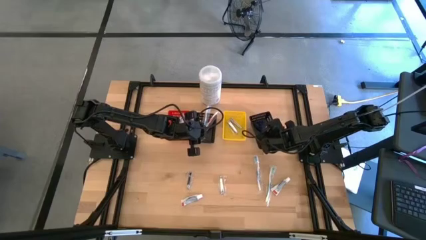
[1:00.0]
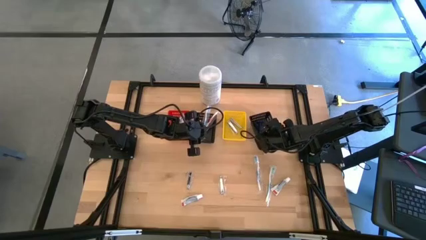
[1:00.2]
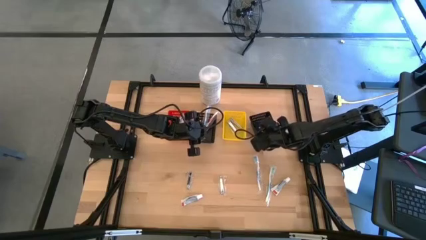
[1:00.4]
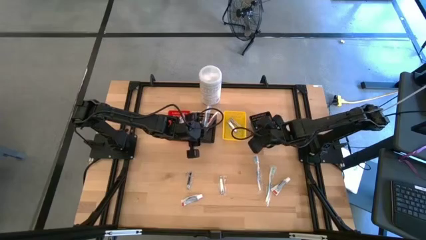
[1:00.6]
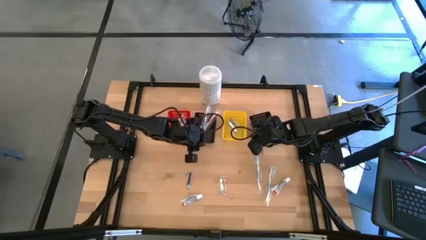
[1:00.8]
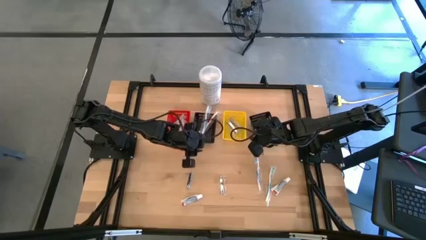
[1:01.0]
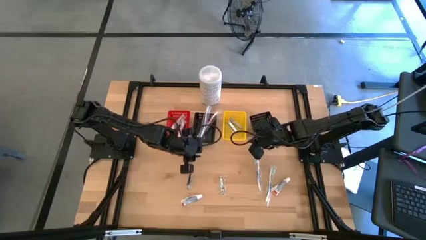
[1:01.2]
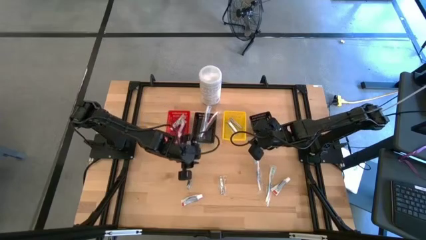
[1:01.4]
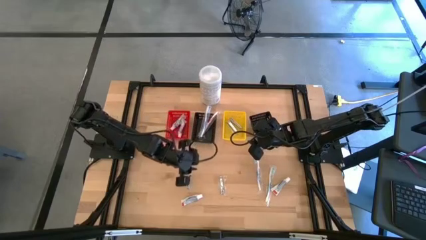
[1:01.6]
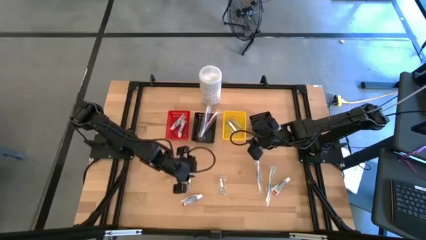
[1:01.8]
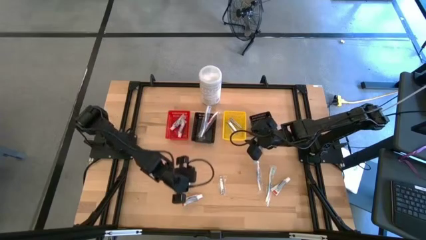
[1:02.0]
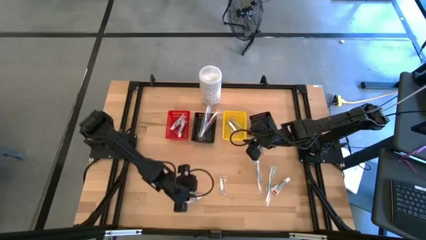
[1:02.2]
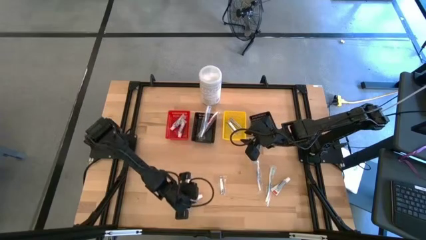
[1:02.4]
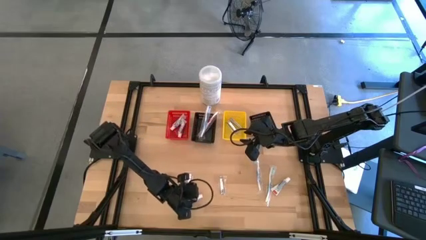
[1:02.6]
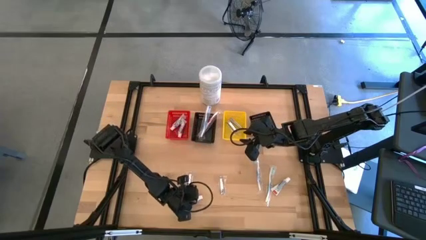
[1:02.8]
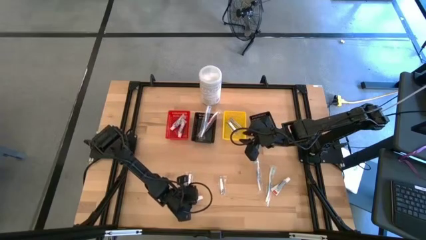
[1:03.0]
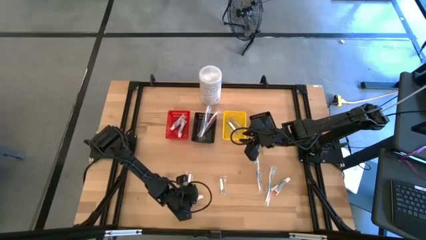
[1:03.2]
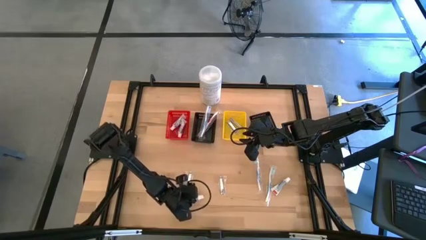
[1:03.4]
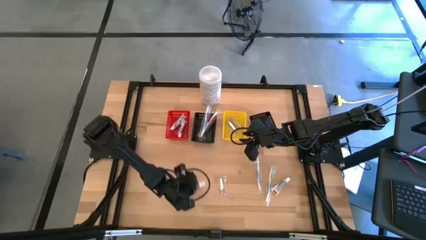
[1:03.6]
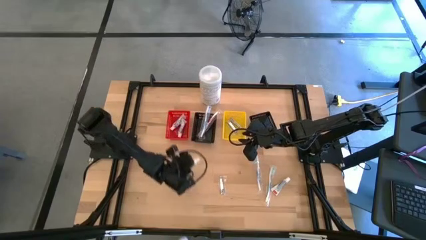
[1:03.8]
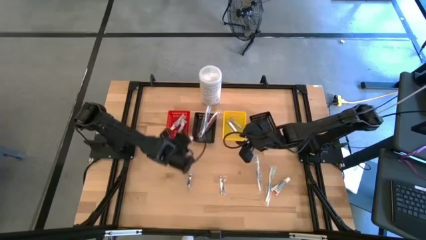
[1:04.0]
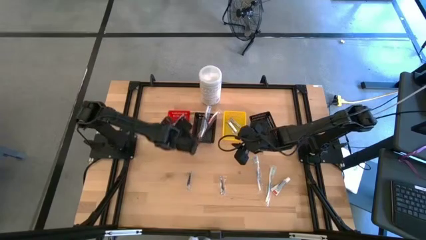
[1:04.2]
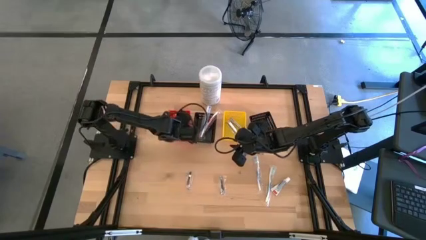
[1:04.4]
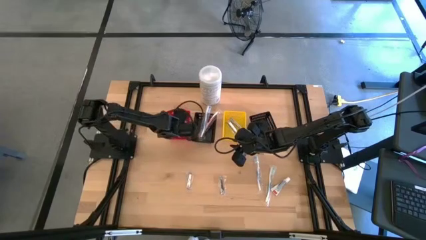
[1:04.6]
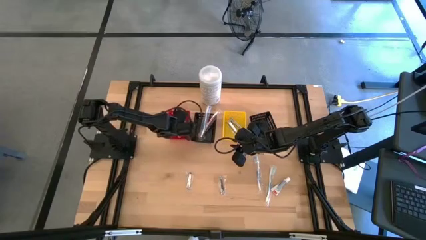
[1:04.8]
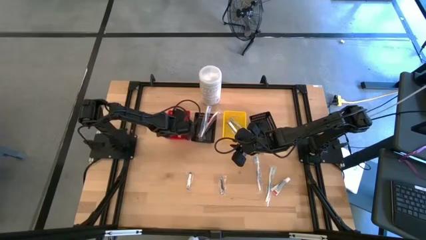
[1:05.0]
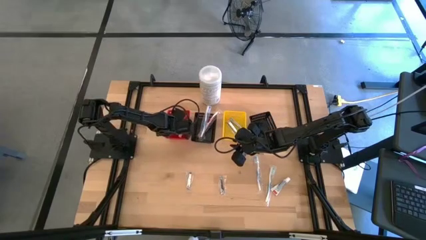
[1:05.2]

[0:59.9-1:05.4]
Task: Pick & Place Travel size toiletries
Put the toothpaste into the red basket

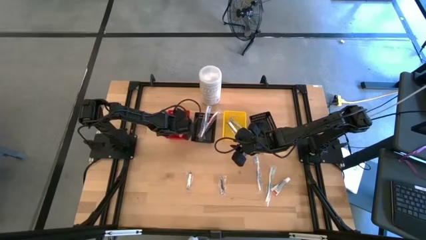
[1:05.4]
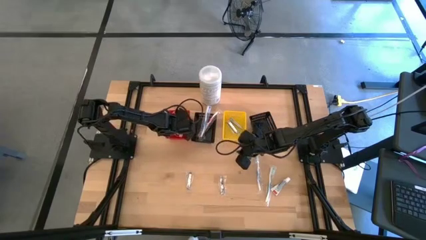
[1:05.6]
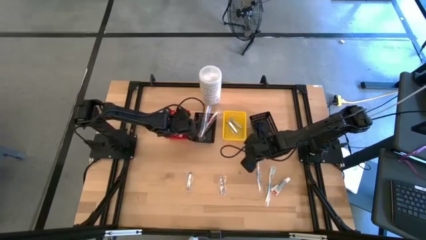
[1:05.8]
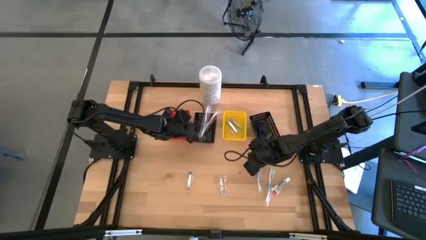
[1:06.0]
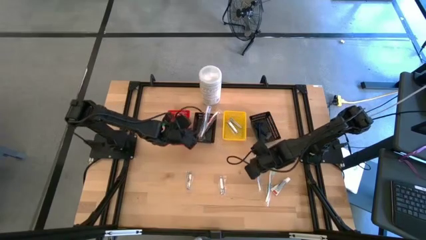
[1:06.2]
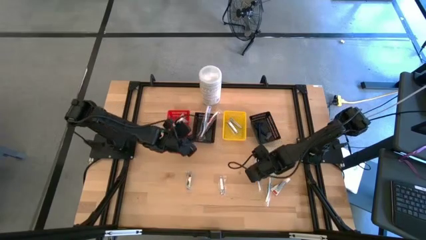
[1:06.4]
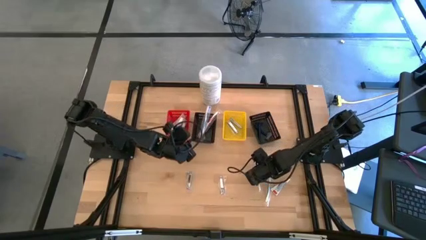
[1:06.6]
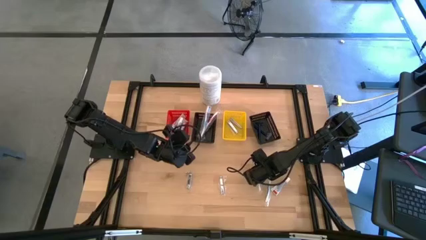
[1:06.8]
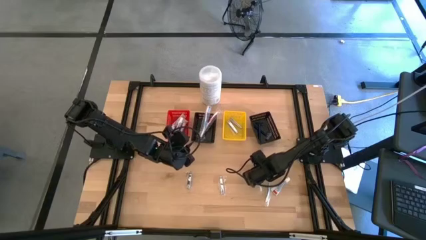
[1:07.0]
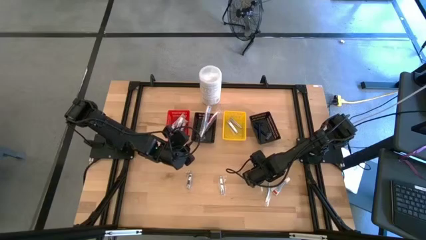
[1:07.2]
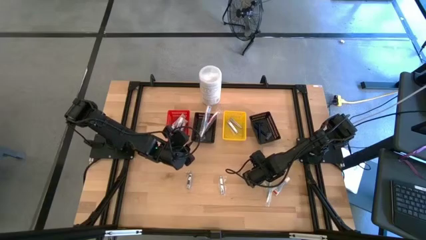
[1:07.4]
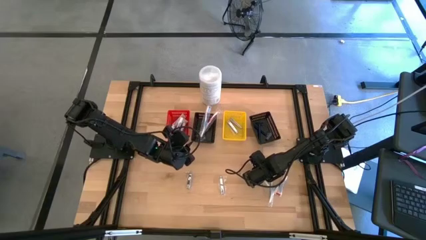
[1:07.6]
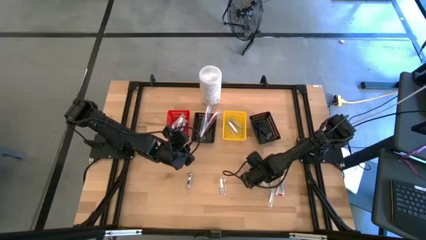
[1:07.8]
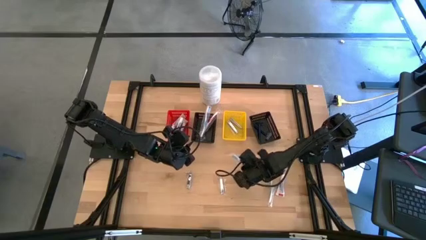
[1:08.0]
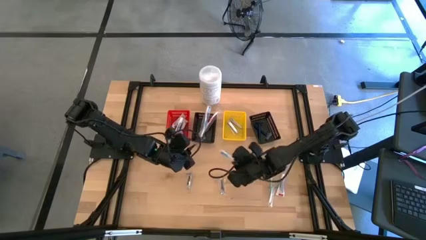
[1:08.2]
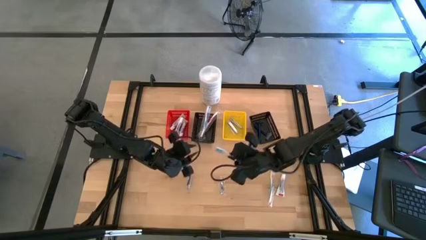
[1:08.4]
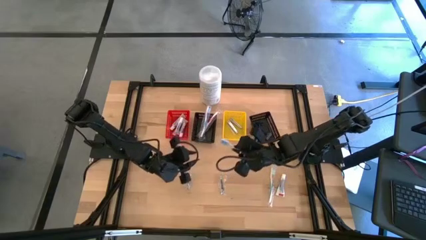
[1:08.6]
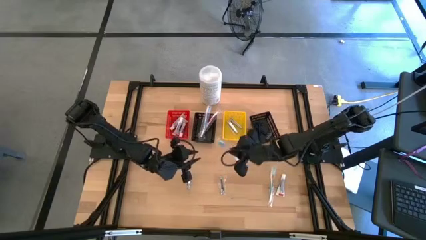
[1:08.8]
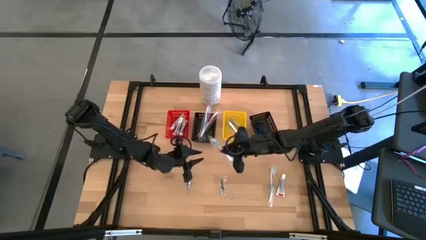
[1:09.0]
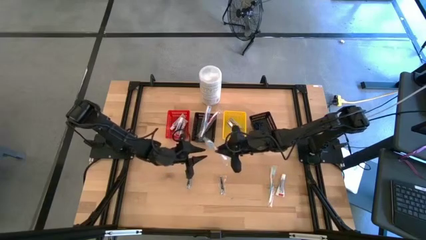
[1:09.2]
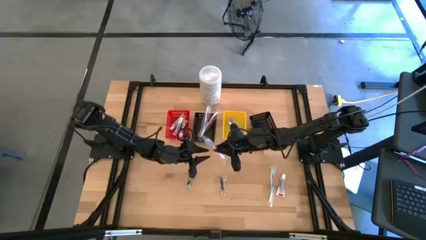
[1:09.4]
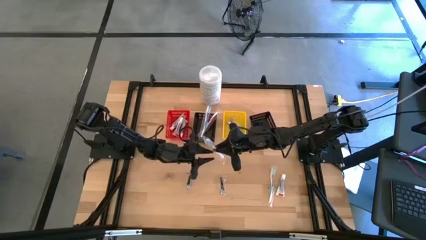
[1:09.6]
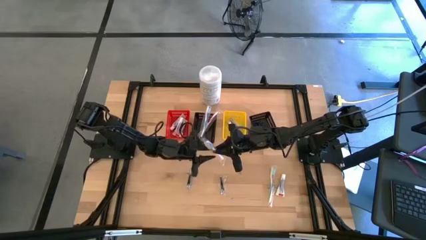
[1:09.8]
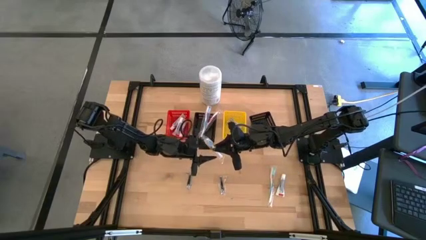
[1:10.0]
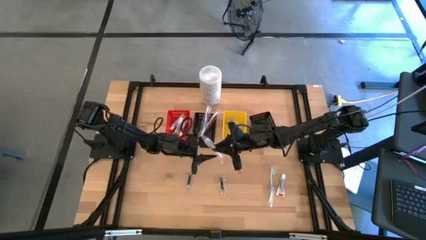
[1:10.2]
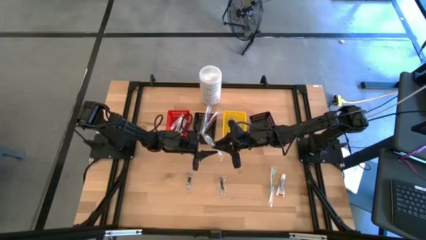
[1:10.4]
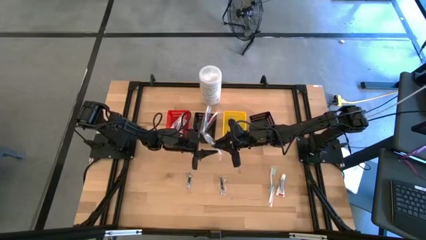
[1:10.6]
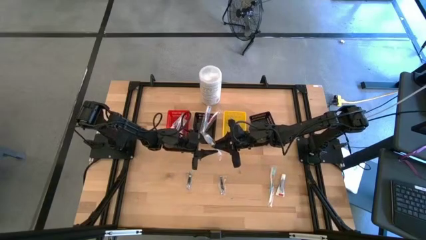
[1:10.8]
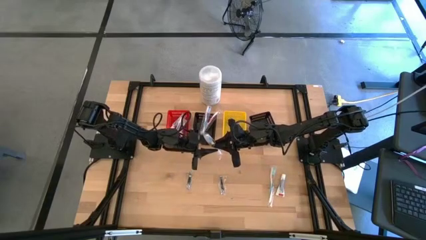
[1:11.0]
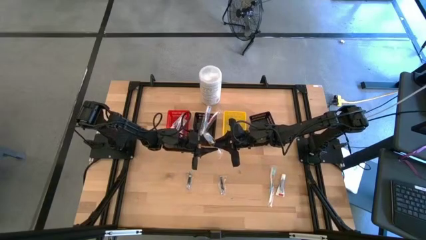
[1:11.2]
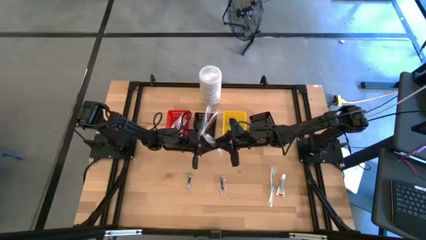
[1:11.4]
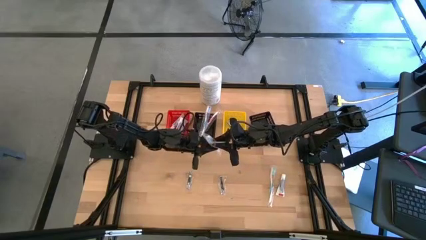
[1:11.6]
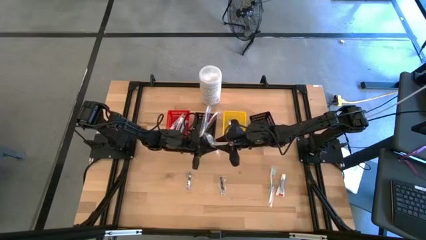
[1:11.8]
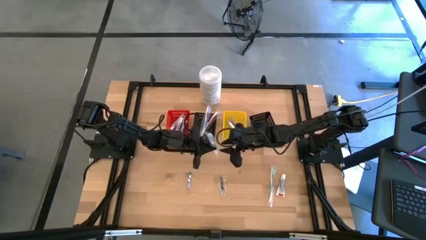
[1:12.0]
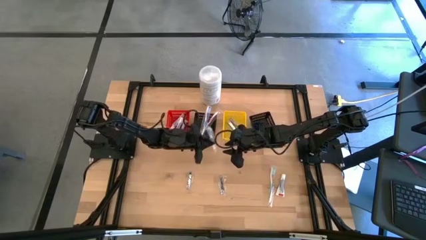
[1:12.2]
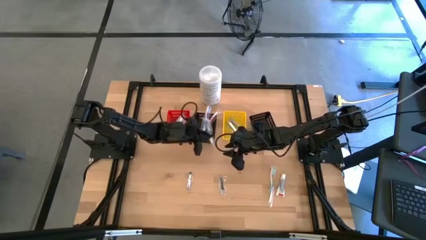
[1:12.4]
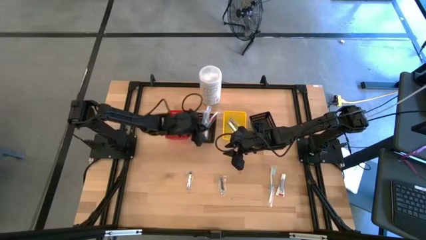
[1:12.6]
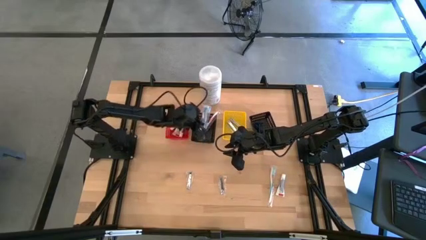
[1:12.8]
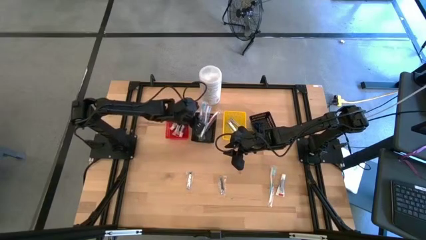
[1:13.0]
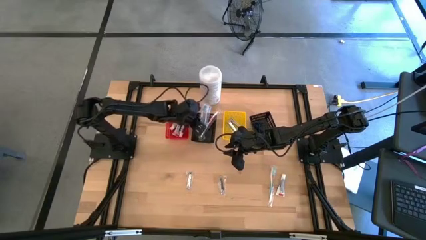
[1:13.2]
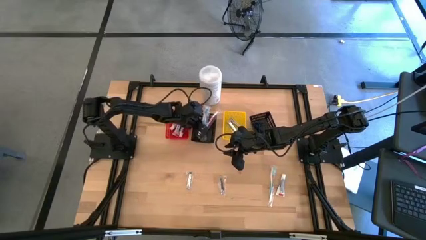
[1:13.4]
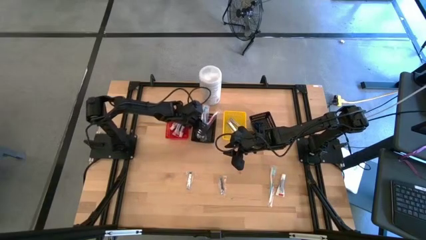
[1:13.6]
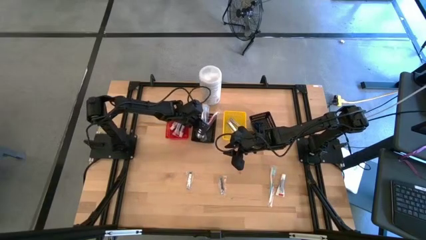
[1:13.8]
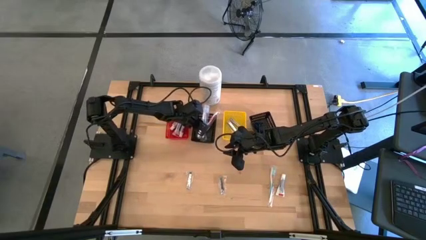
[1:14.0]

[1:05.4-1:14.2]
Put the blue toothbrush into the left black basket

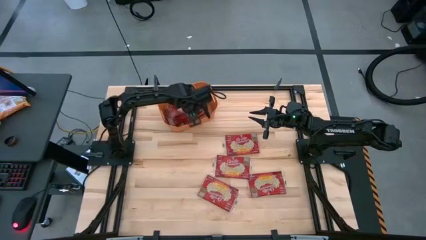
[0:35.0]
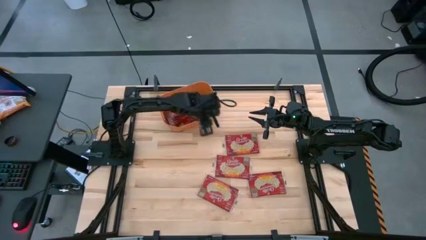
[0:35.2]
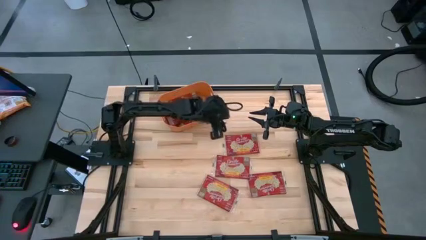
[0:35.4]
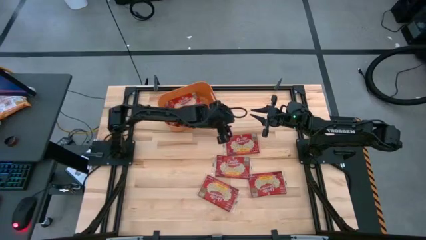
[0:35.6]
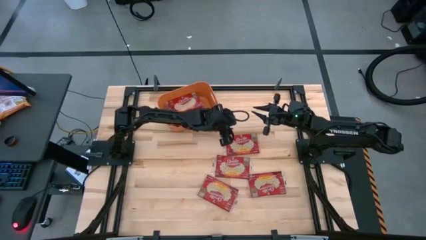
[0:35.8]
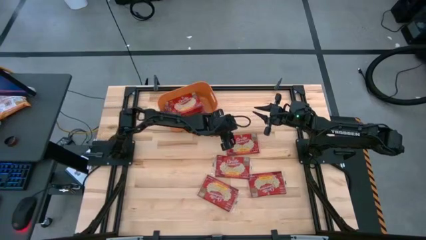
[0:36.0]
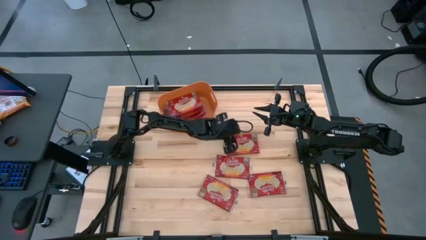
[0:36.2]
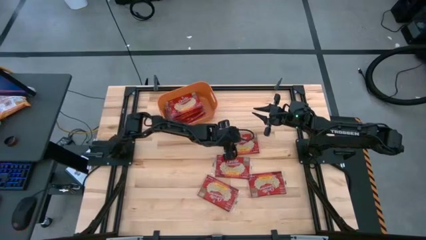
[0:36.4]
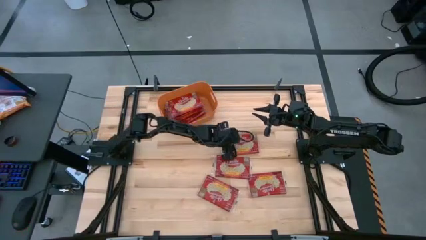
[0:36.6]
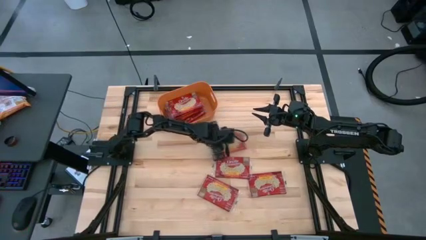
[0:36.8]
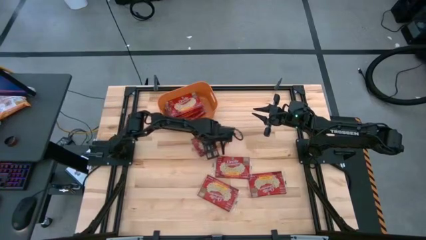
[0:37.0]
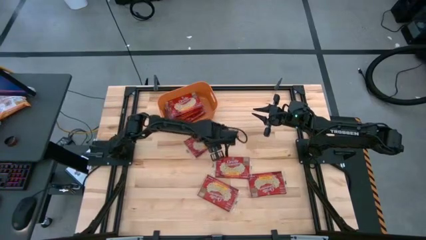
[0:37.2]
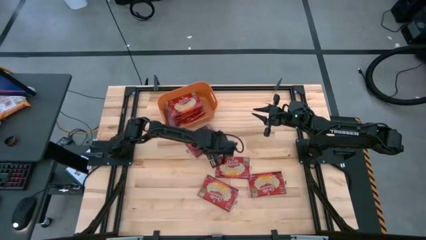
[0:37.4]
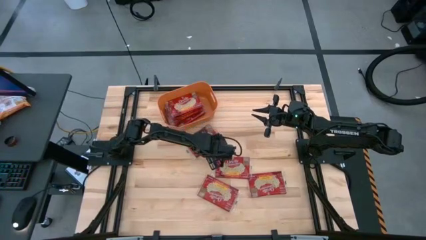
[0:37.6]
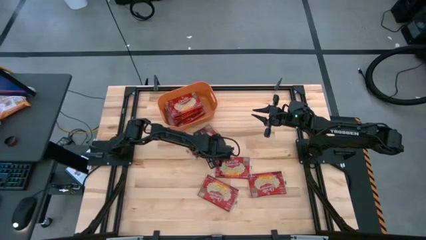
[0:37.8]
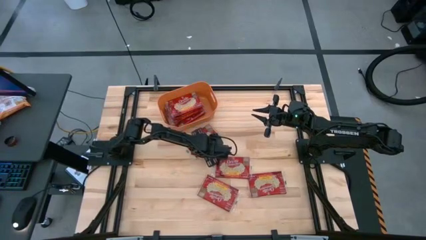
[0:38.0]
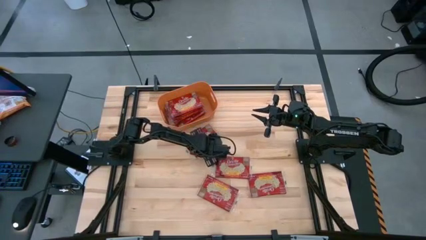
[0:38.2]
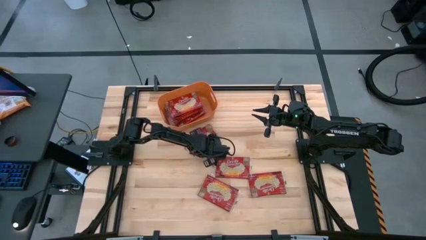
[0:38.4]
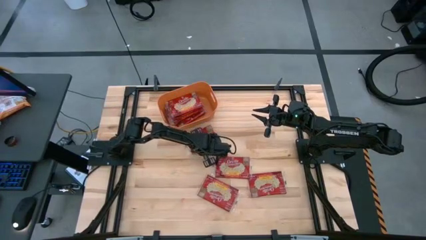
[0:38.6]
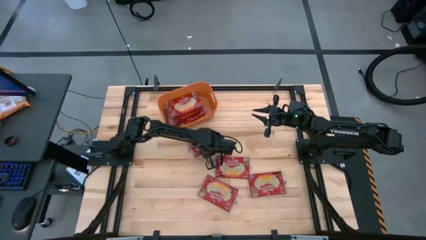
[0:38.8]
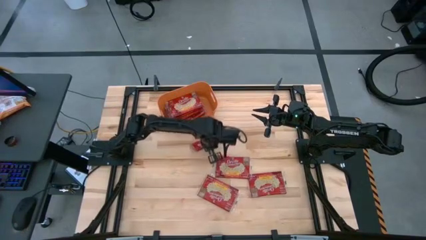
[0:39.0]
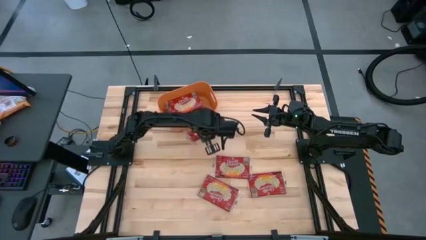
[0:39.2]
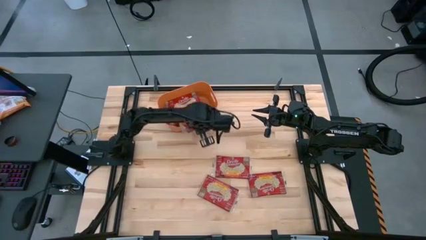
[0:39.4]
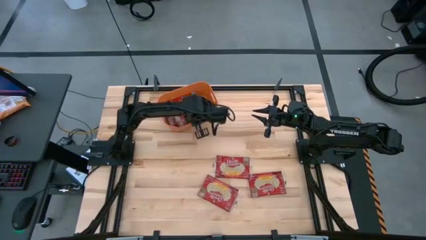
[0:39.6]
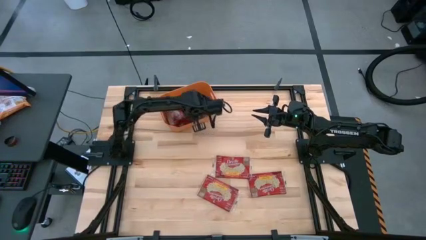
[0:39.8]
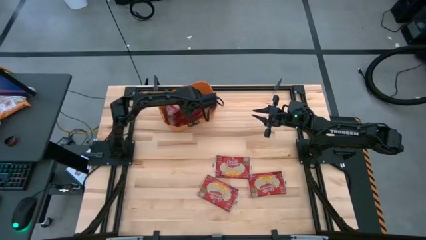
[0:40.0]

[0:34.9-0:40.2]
Task: Sort popcorn bags into baskets
Put the red popcorn pack into the orange bin
